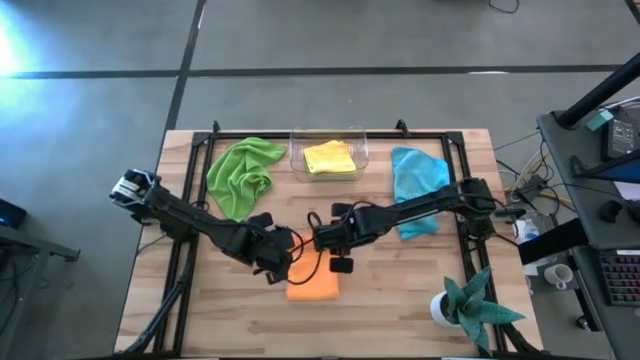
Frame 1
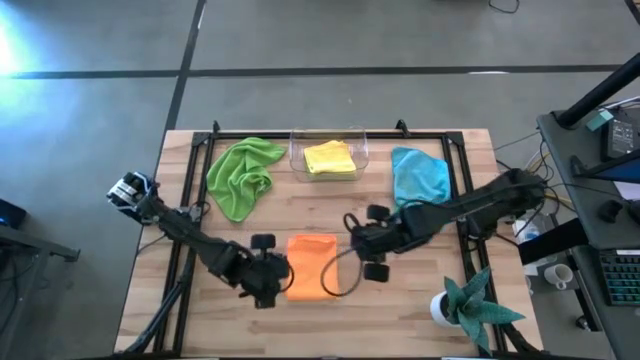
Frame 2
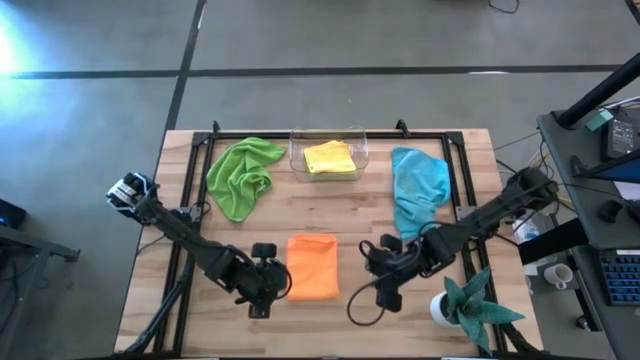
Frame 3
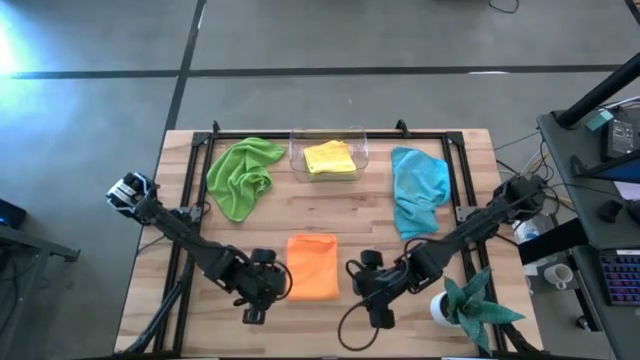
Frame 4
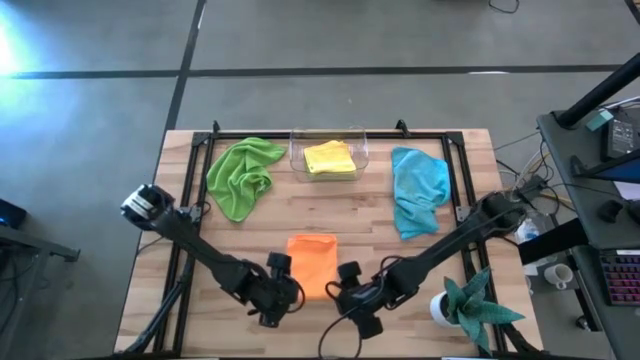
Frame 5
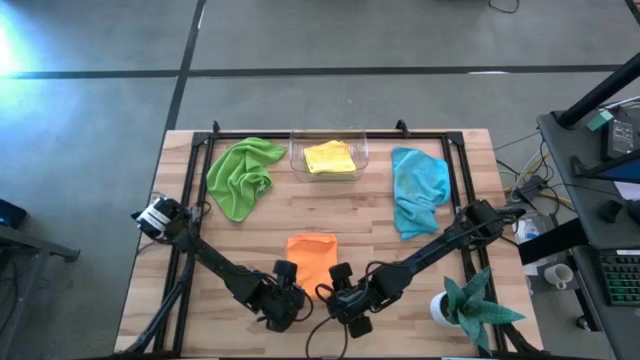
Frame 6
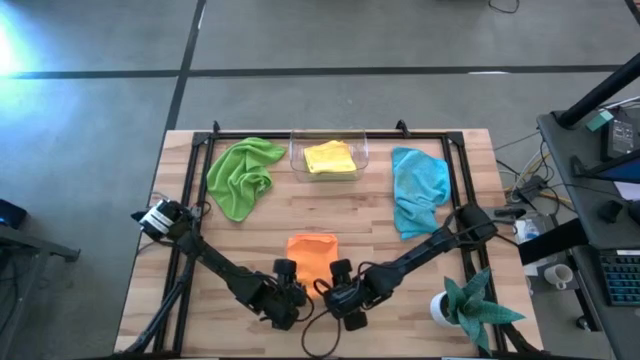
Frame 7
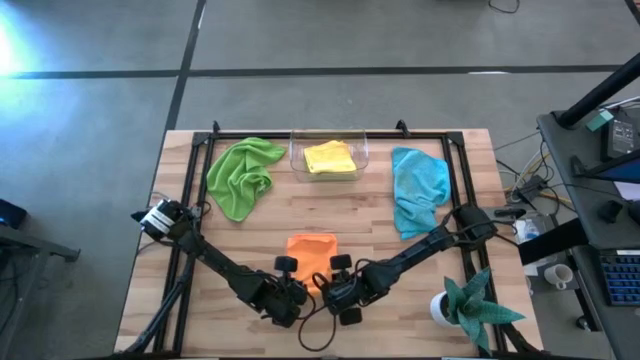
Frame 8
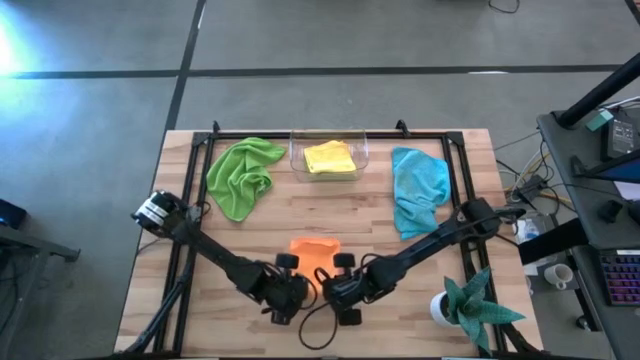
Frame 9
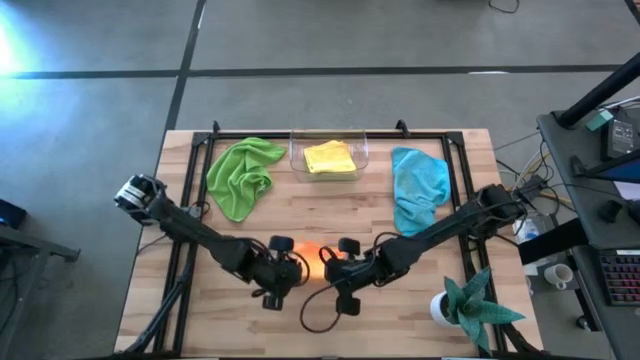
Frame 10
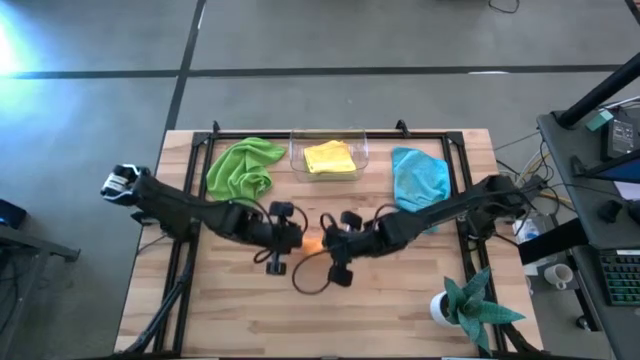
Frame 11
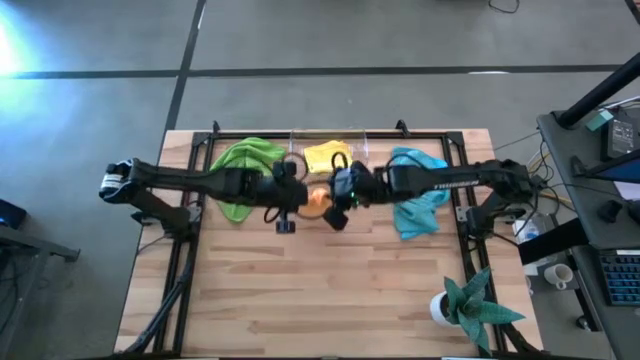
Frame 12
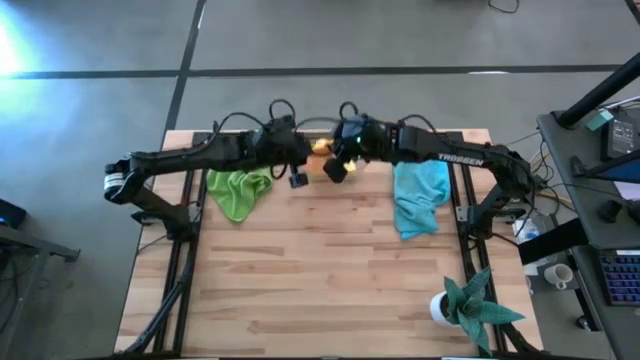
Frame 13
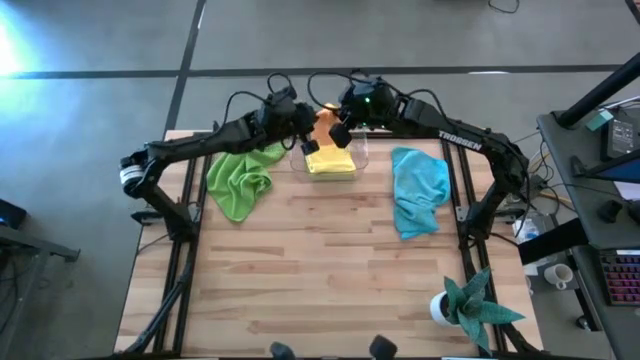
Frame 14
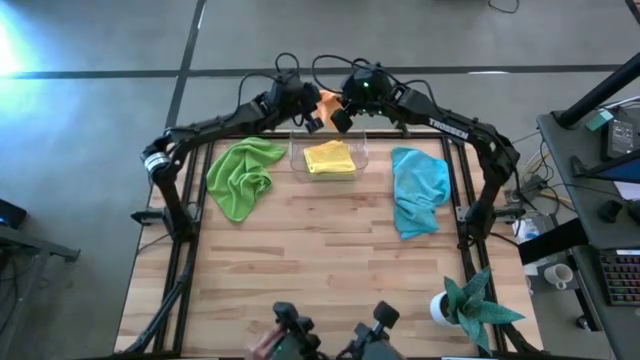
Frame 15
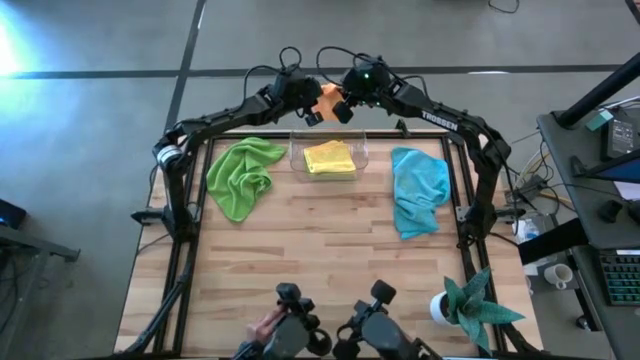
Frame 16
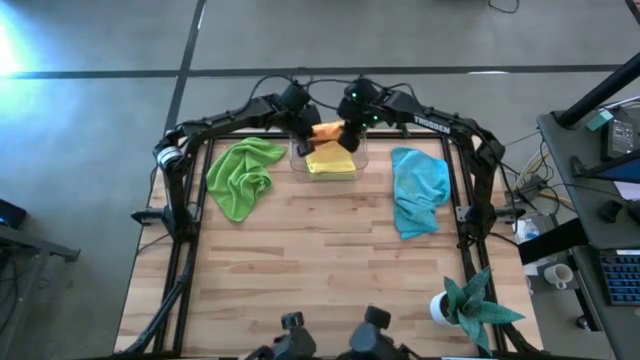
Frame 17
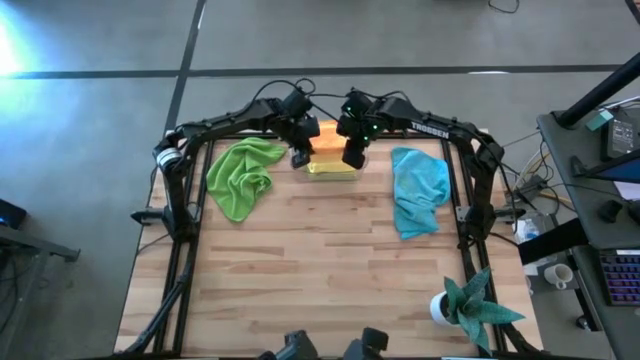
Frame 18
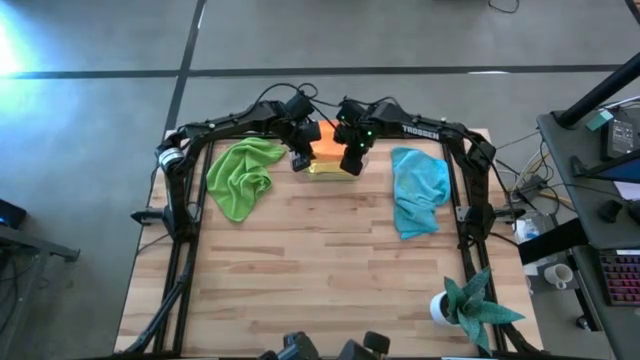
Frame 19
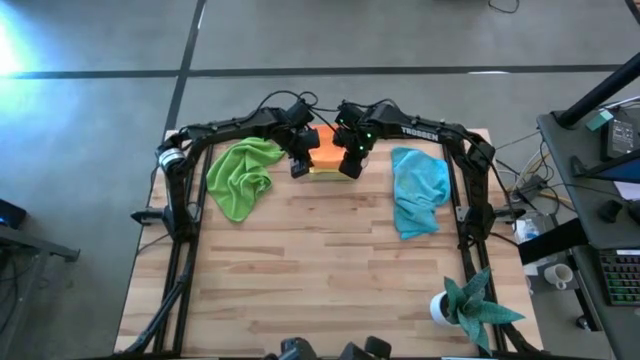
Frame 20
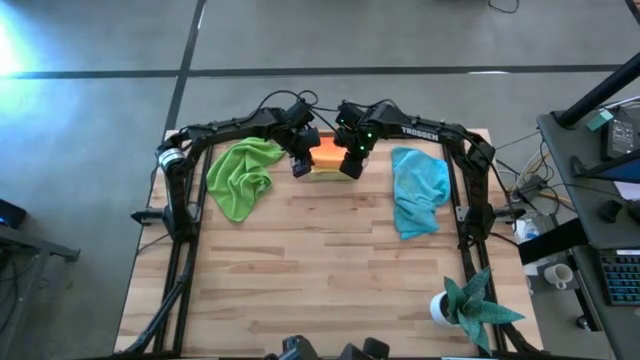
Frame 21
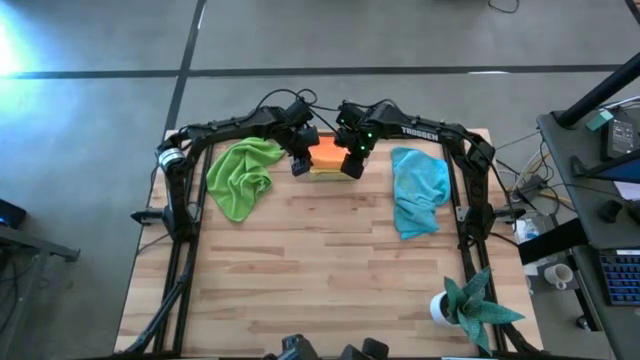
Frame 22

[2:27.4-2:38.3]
Task: Fold microfiber towels
Put the orange towel into the transparent bin

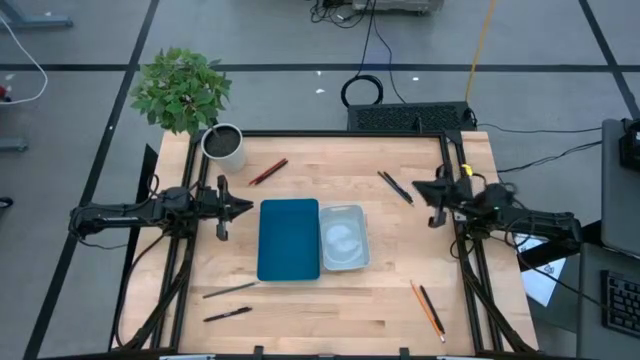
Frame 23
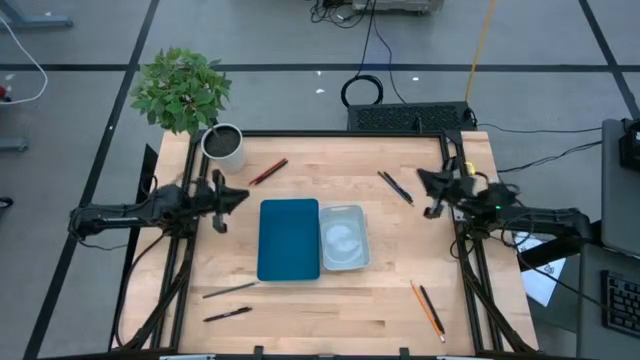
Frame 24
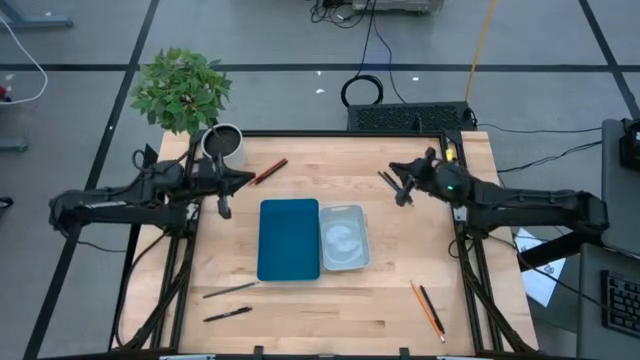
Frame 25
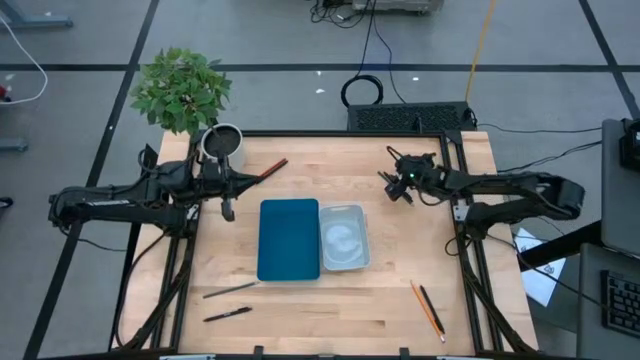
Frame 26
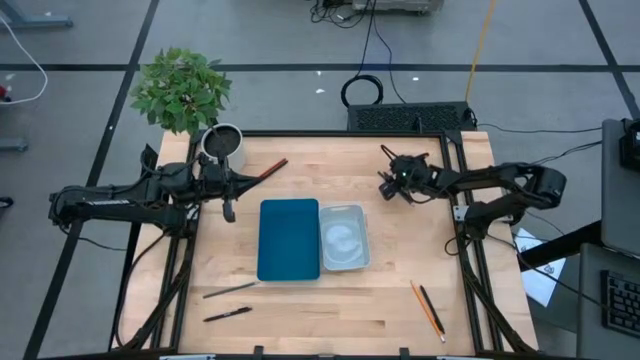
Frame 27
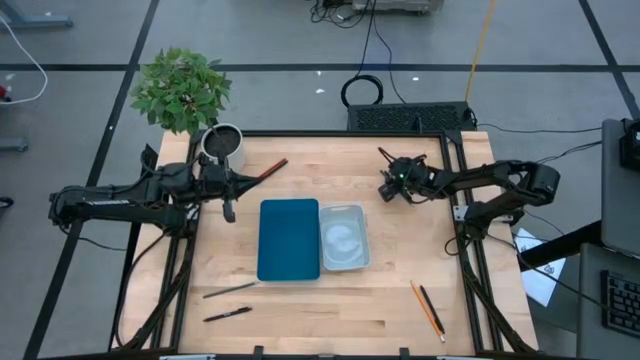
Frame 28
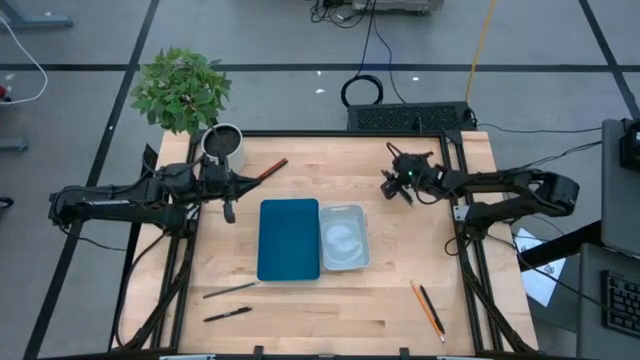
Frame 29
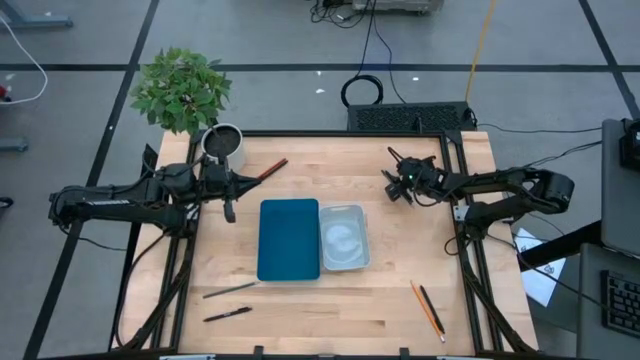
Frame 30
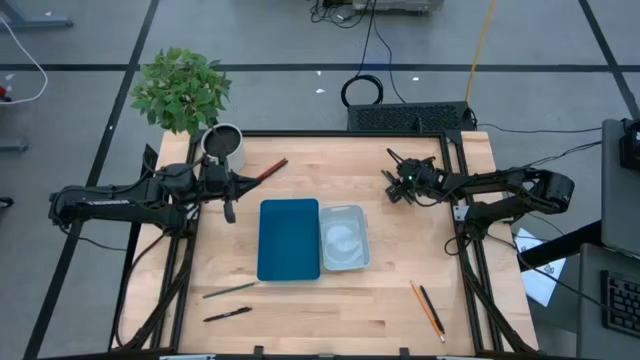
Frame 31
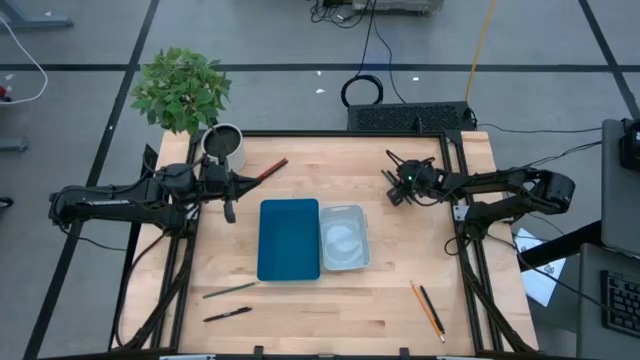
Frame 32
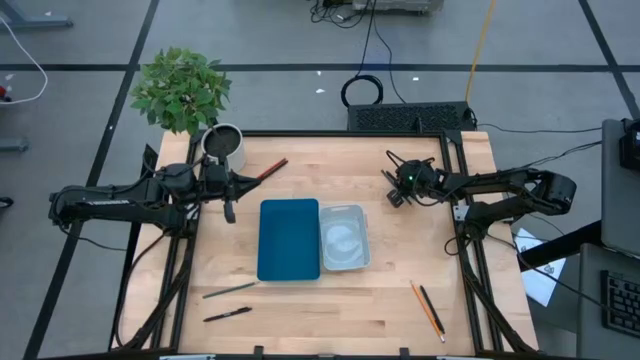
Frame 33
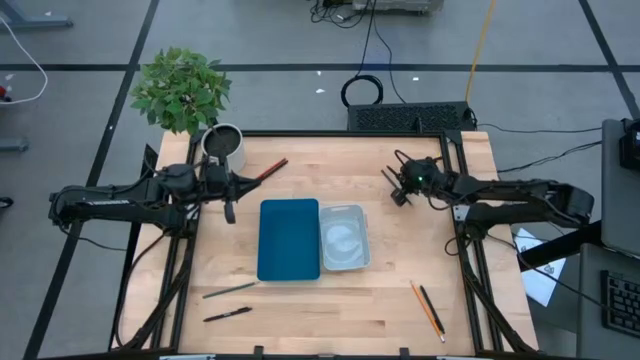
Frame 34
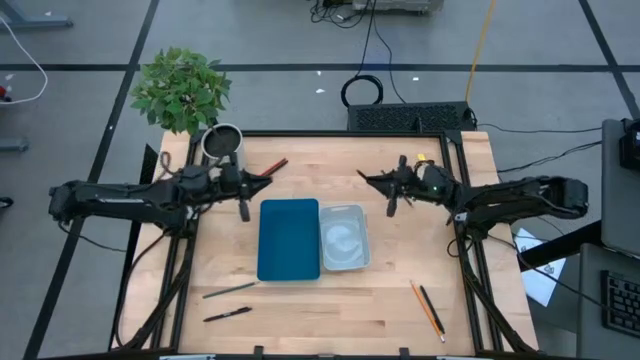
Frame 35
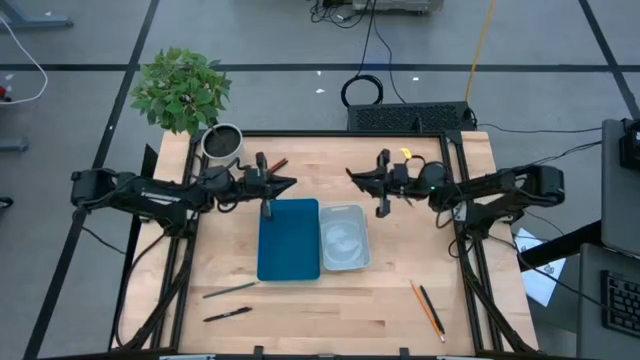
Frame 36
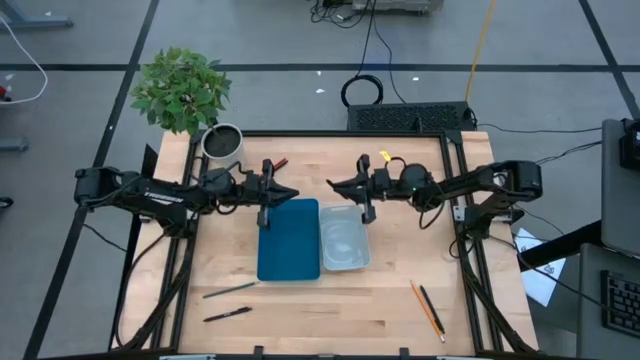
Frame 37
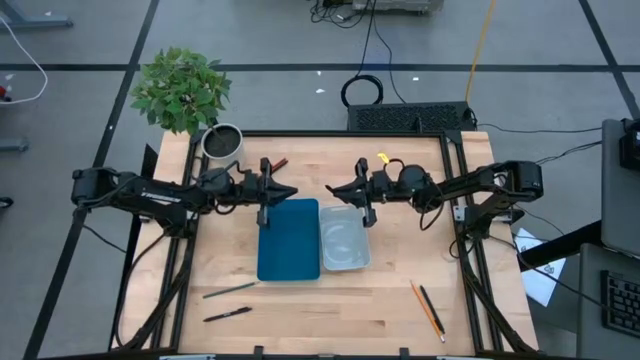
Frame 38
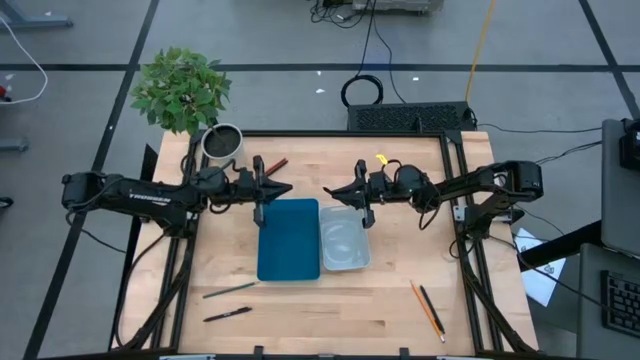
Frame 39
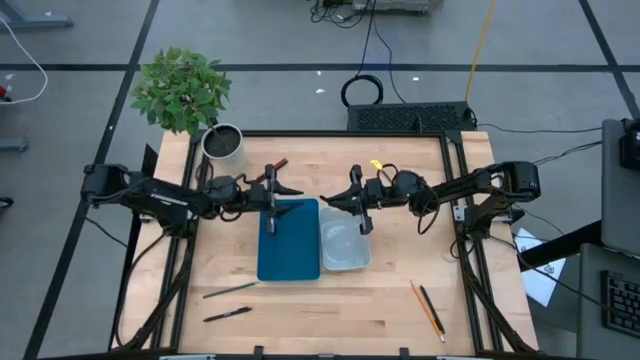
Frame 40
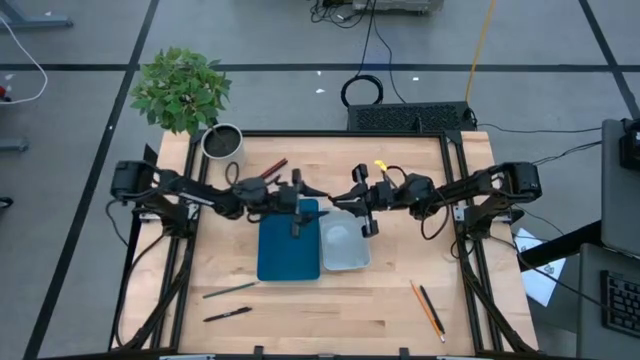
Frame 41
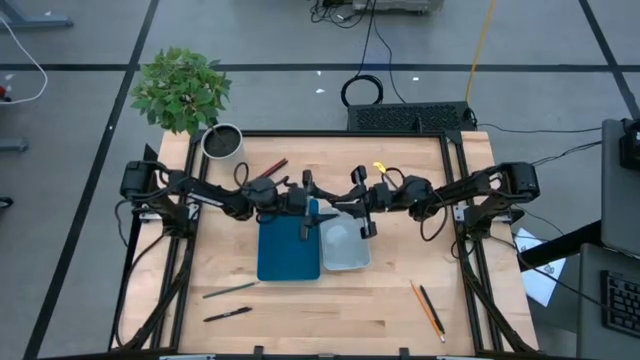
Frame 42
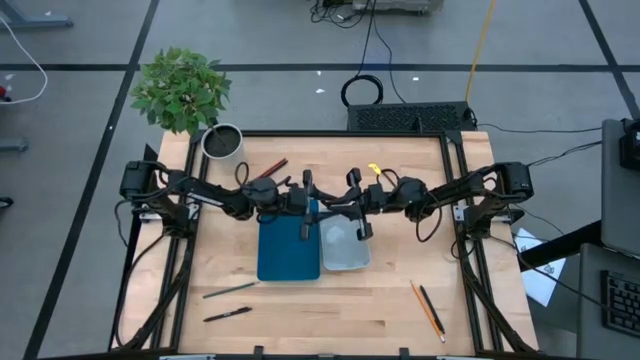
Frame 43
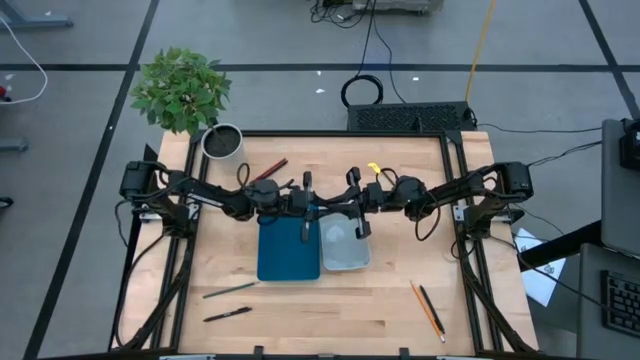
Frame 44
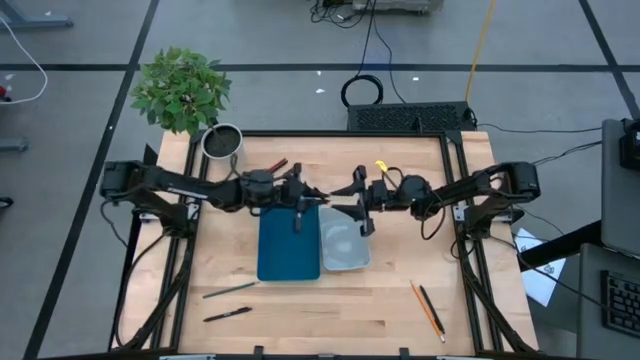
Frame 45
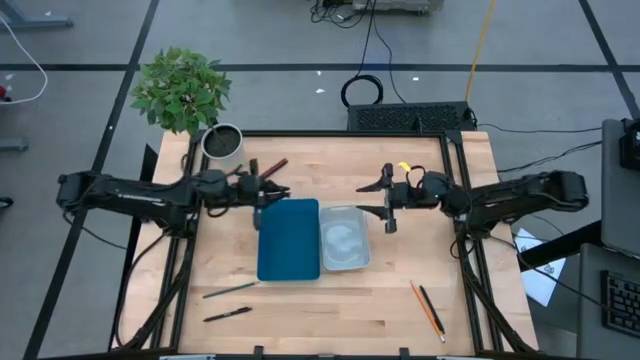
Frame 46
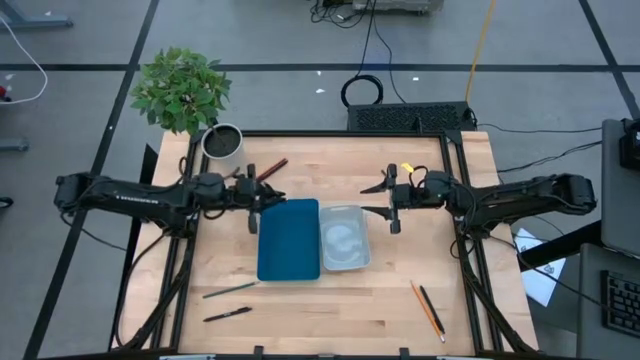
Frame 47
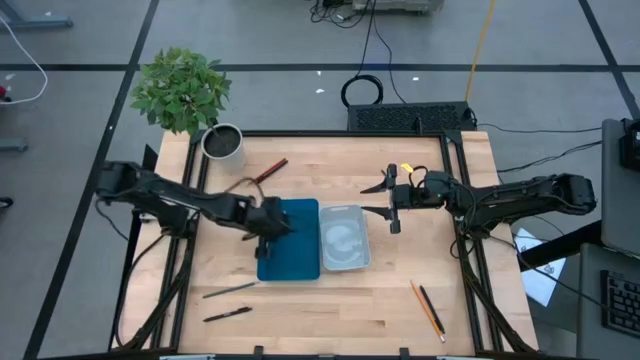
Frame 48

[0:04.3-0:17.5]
Task: Sort pens & pencils
Put the top right black pen into the blue bin
